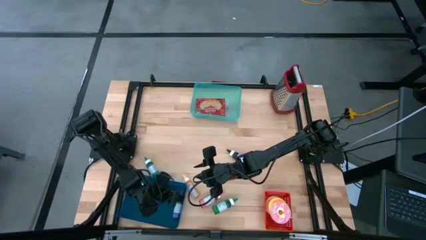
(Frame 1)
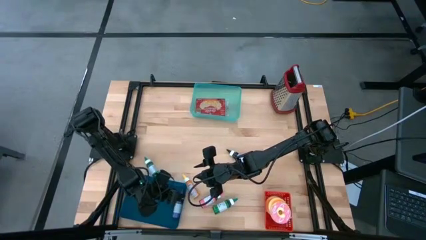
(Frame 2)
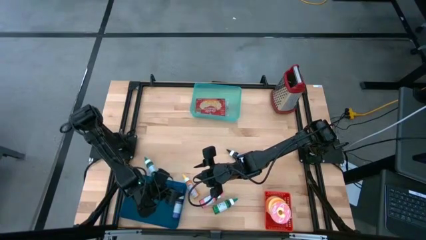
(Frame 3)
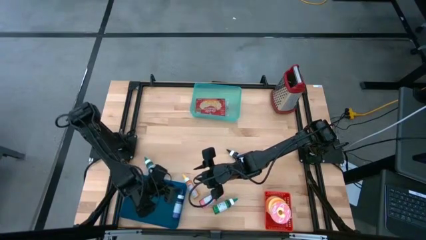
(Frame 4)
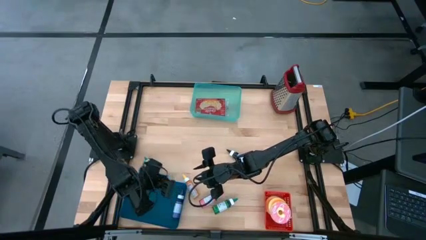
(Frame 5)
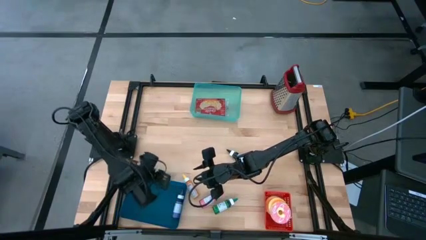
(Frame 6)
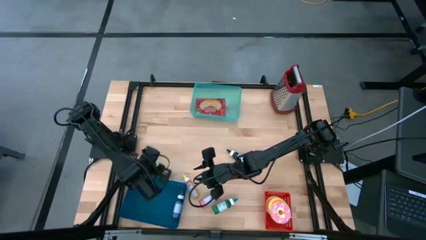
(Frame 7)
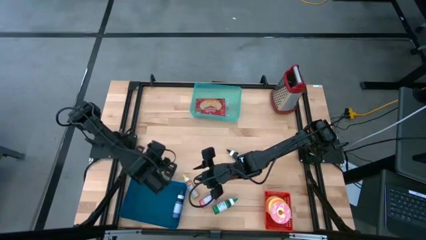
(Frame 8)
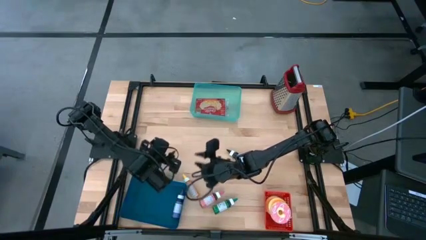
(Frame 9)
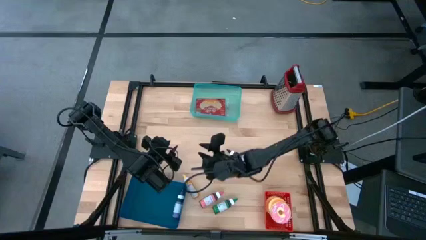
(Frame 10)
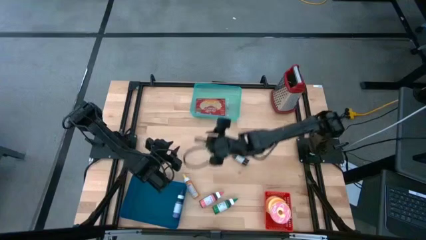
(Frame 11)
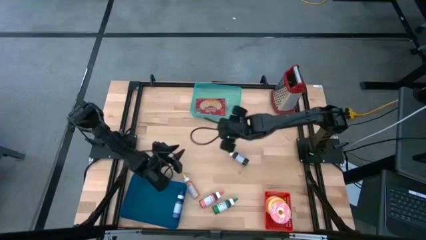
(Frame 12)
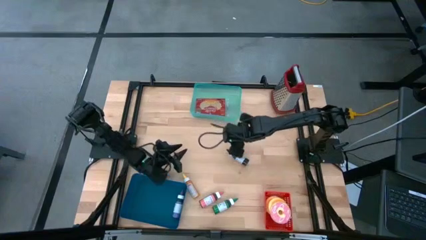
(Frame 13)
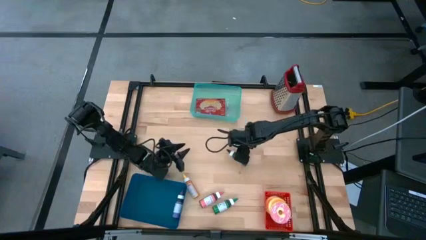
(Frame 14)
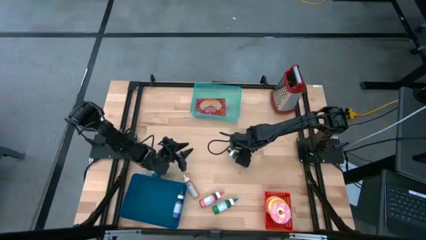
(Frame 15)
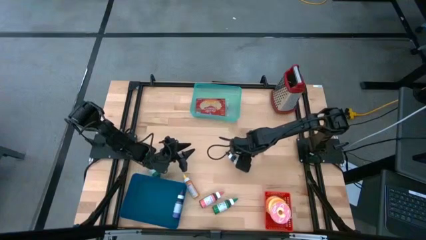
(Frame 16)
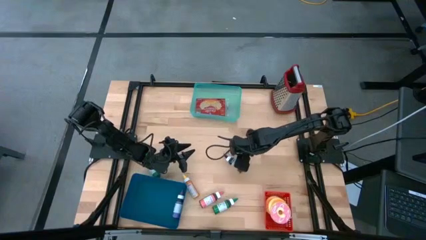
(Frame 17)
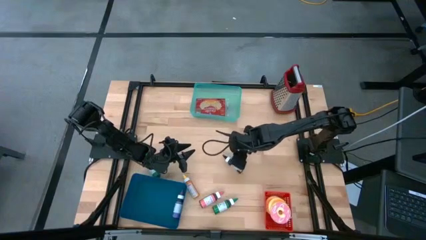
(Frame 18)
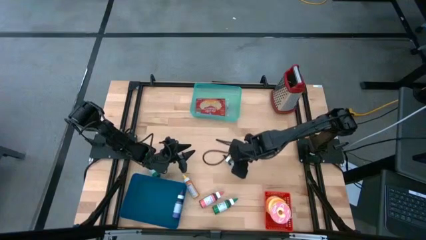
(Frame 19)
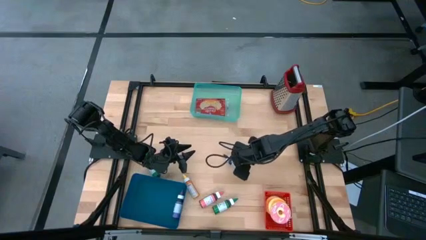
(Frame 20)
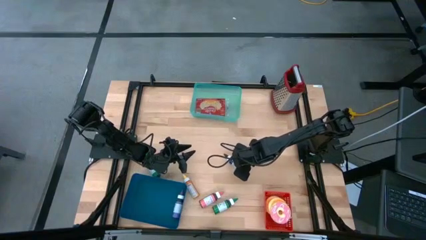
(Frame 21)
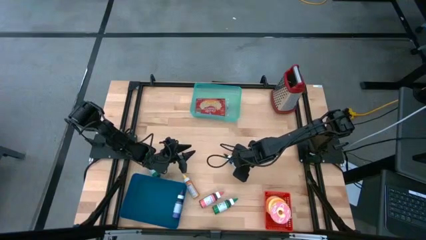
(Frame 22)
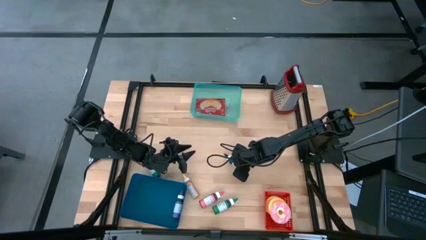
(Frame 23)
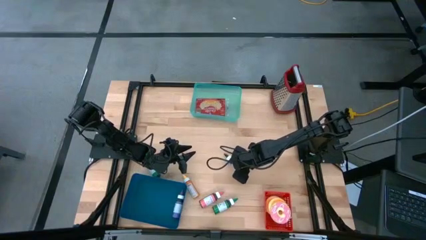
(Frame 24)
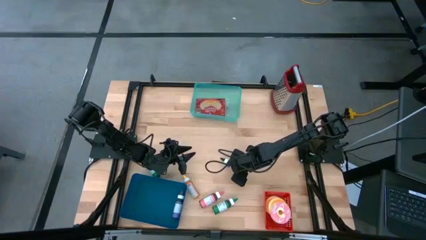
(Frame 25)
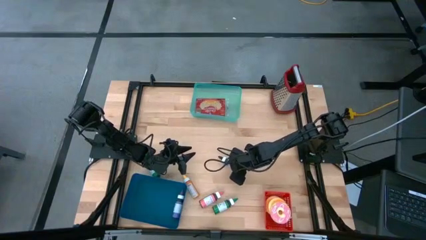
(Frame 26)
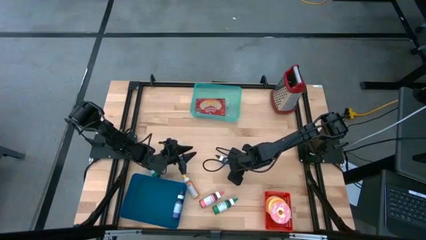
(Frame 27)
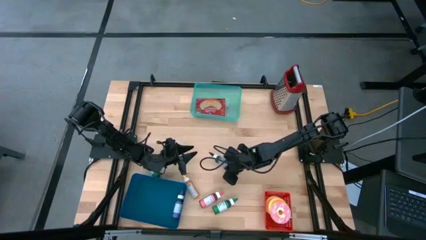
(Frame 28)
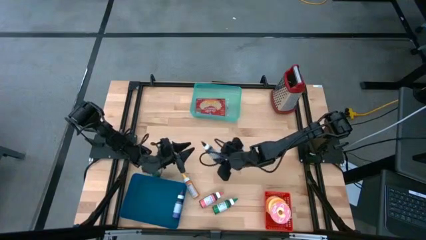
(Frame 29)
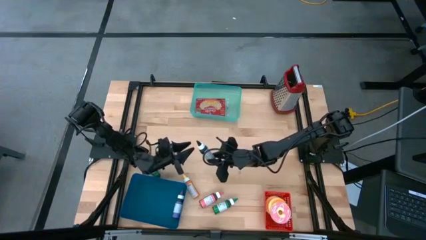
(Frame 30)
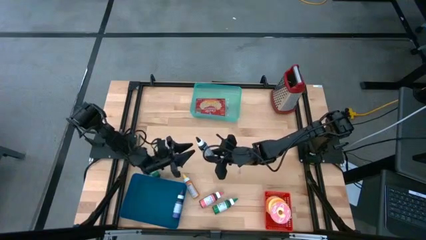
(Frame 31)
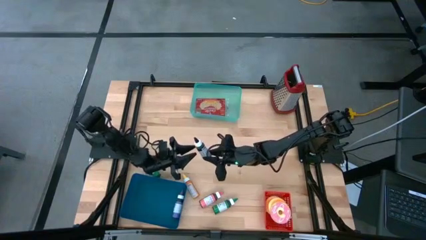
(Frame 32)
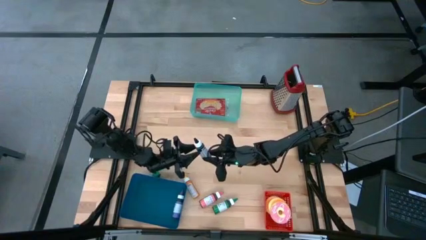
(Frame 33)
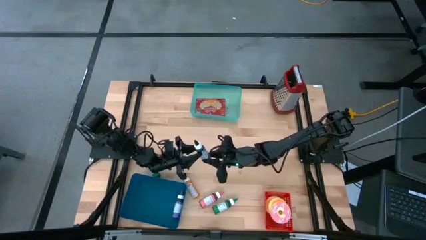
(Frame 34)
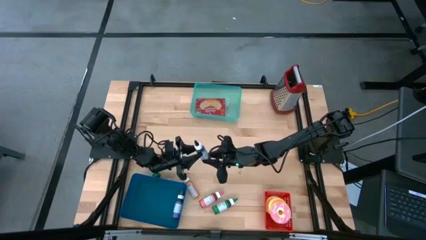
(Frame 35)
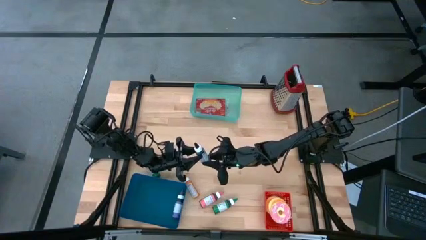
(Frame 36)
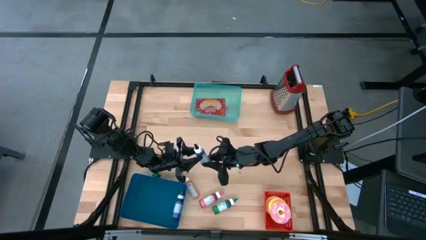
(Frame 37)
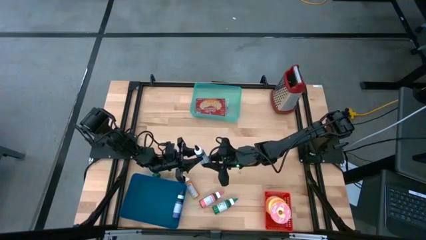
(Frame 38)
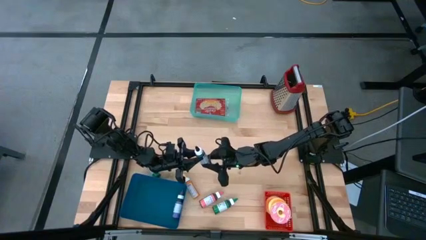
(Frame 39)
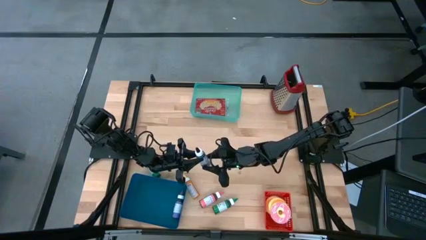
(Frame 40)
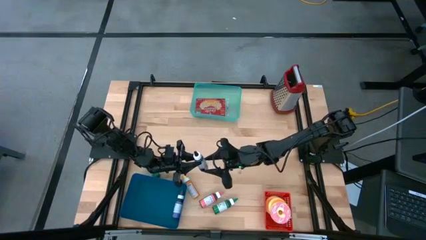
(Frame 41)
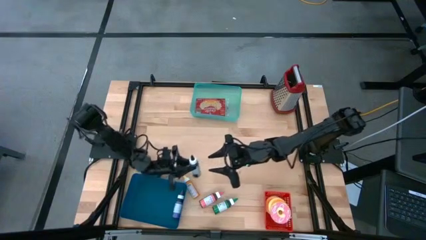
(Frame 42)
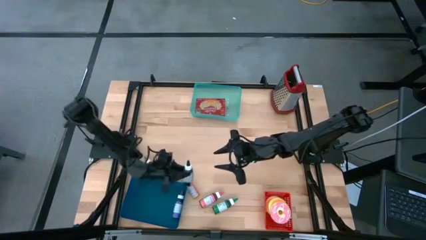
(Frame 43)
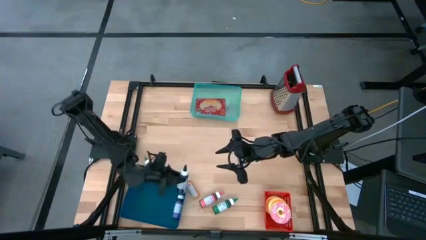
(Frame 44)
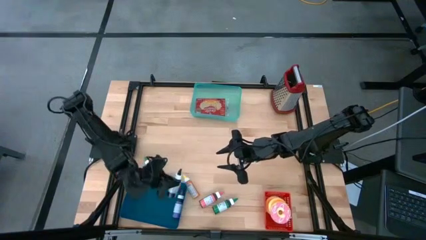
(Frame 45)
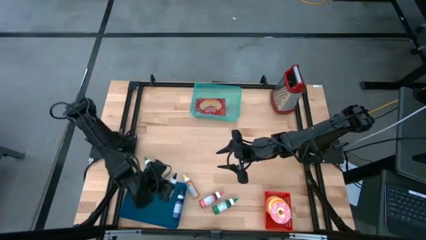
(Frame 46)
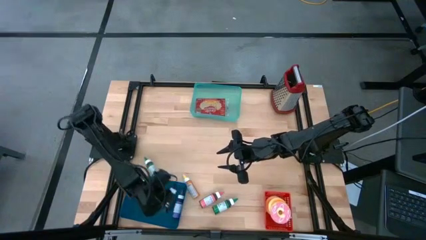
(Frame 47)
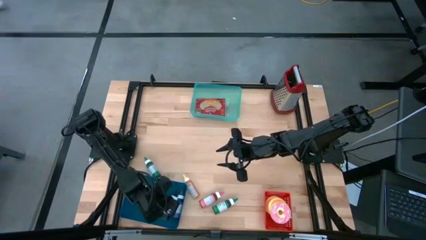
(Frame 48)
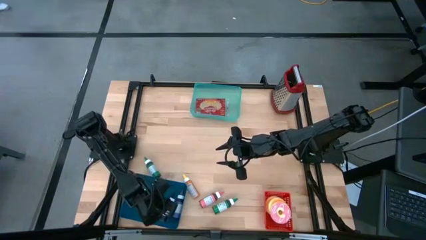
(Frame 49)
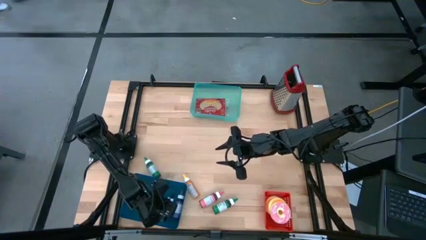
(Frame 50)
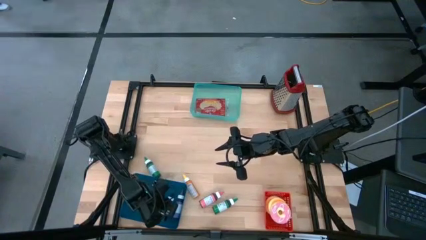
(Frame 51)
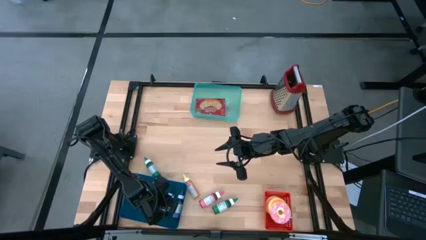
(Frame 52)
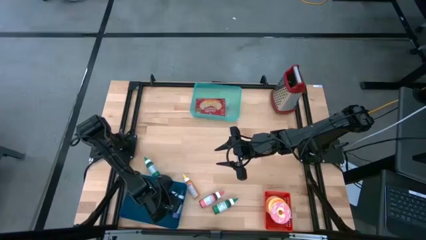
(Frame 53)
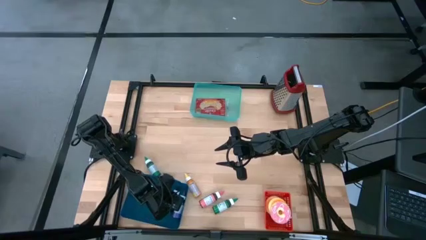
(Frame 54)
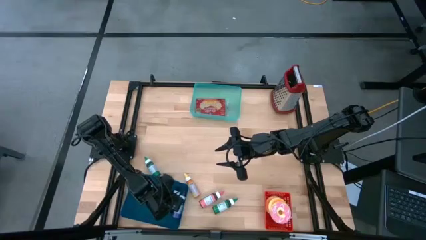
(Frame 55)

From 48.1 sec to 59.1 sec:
Put the black food coloring bottle into the dark blue bin

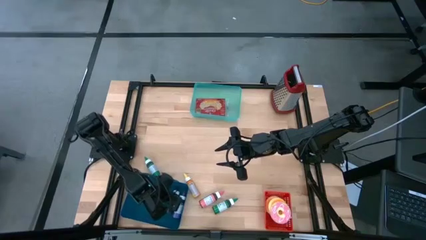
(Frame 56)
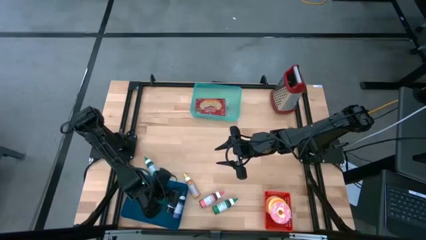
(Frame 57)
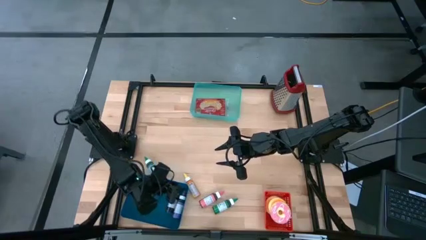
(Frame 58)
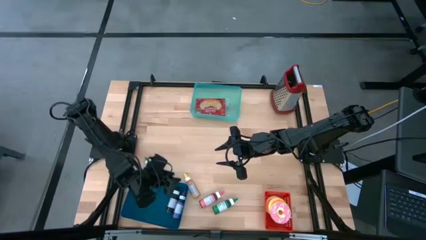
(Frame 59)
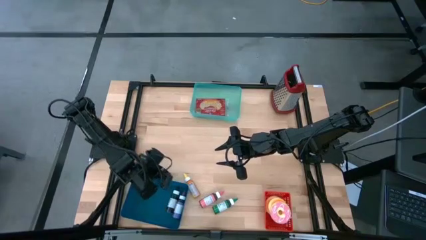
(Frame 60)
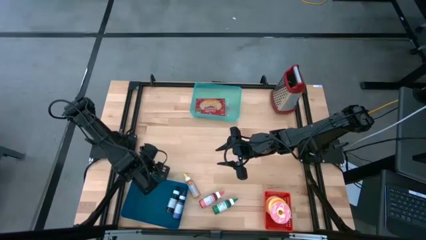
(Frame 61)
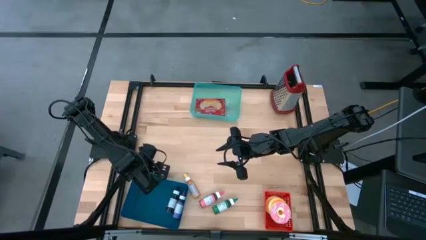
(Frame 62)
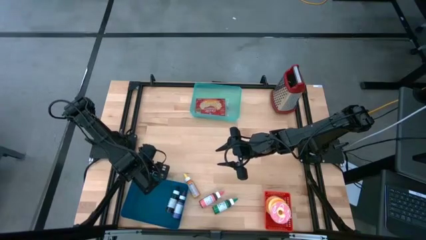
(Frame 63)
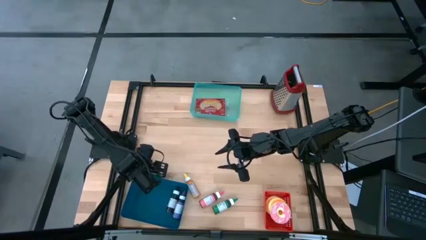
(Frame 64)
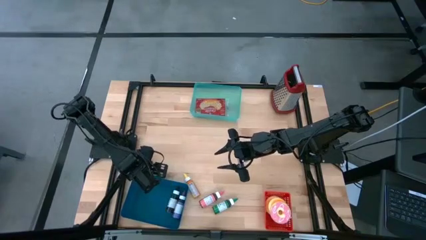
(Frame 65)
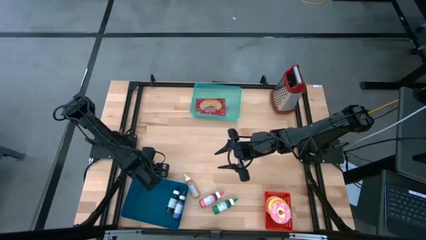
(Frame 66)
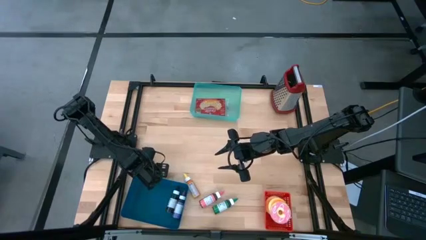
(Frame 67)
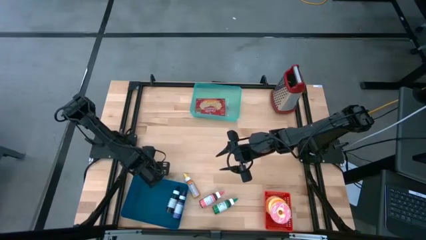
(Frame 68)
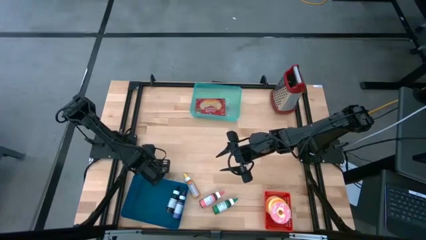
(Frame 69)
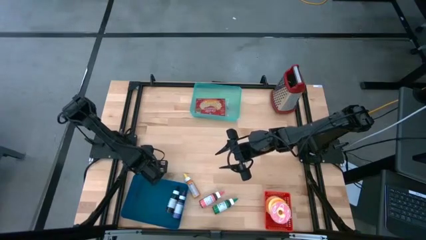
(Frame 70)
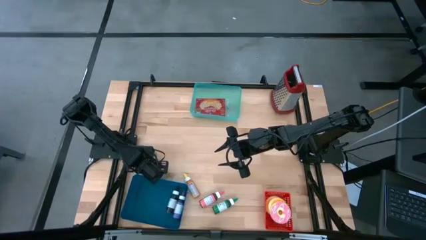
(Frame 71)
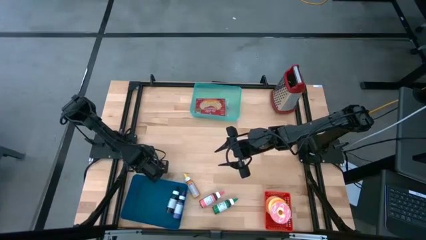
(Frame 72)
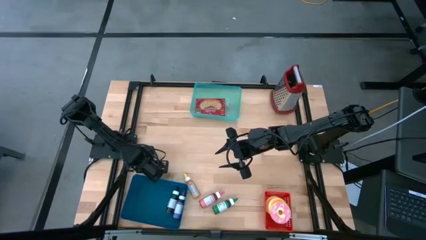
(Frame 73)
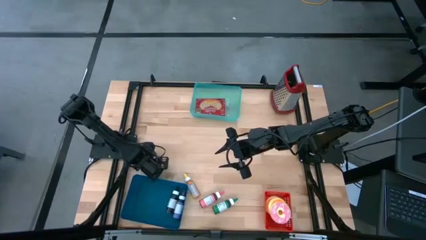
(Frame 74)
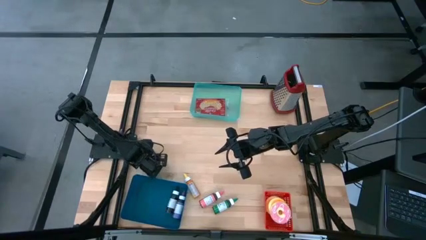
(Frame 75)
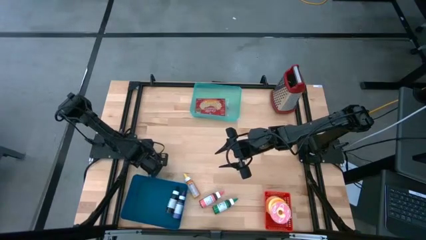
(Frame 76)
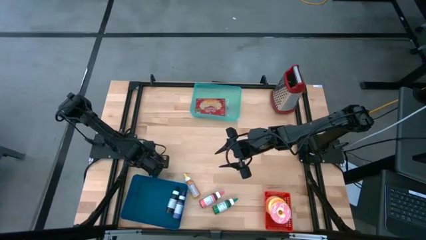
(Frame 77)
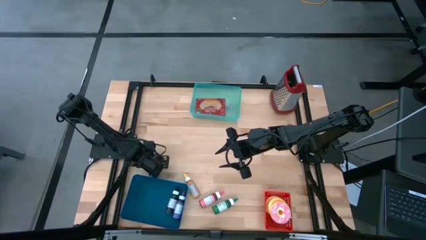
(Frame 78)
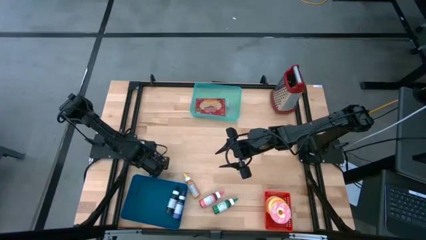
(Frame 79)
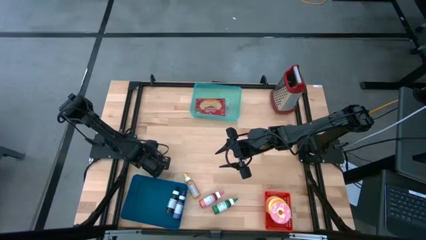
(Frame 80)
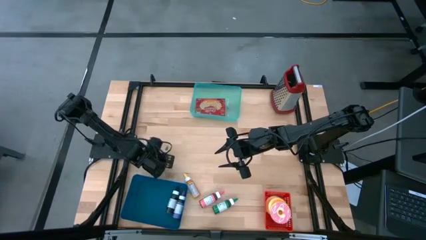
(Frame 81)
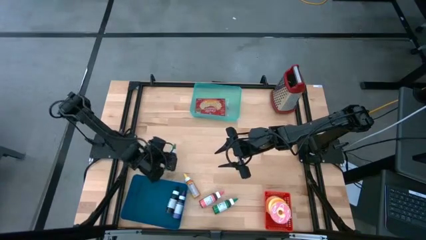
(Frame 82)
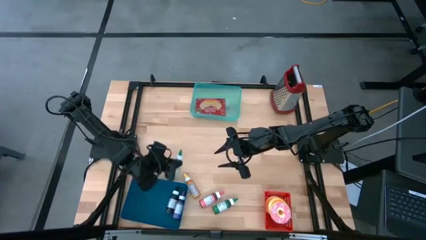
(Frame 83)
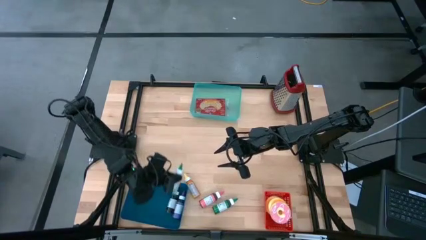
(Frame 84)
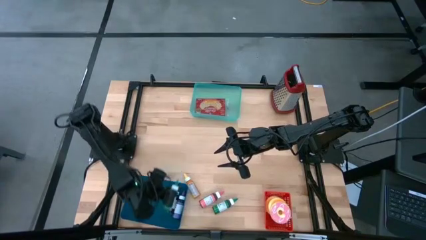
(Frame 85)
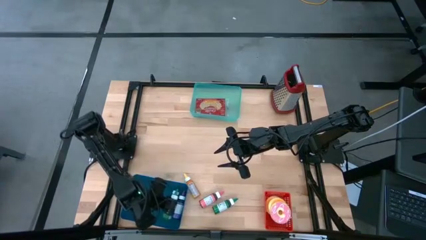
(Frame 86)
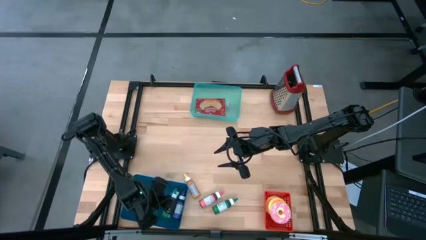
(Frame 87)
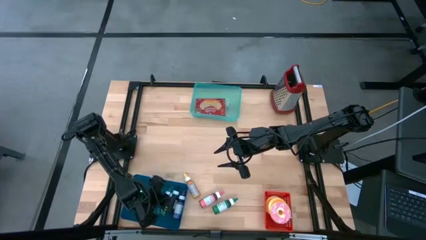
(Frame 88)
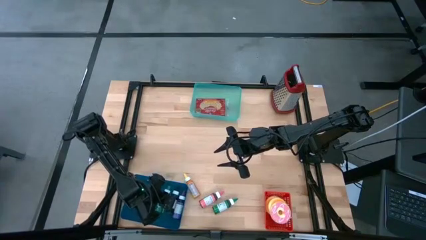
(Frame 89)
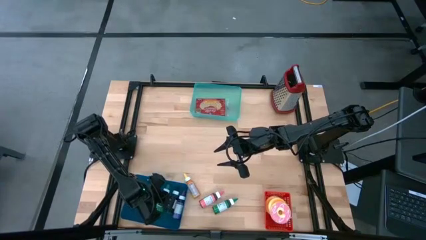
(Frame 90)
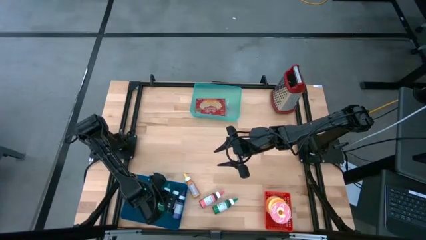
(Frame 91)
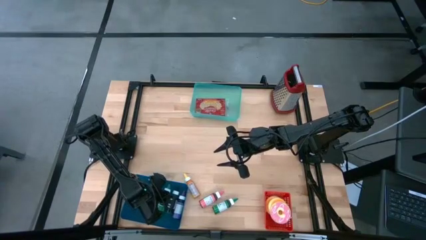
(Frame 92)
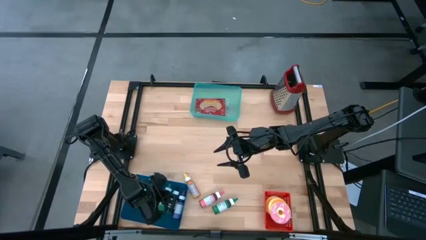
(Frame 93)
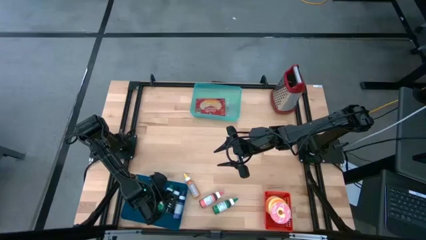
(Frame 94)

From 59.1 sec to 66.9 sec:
Put the left green food coloring bottle into the dark blue bin
